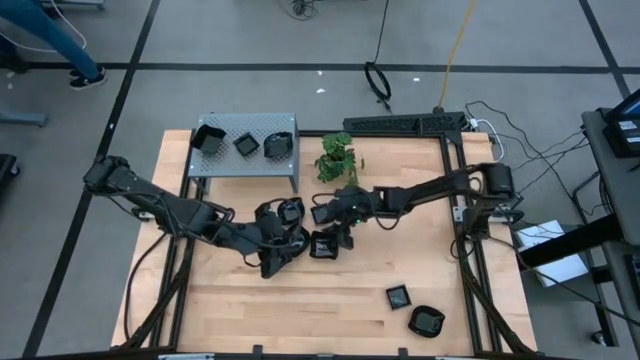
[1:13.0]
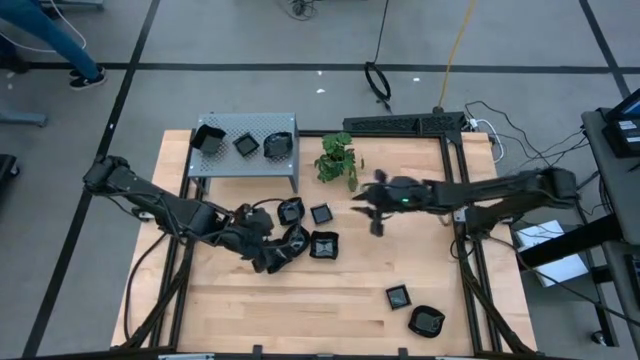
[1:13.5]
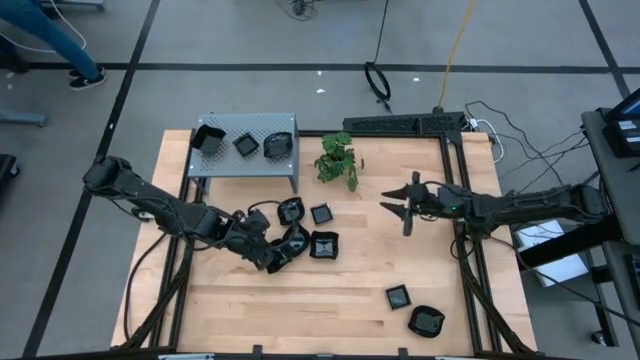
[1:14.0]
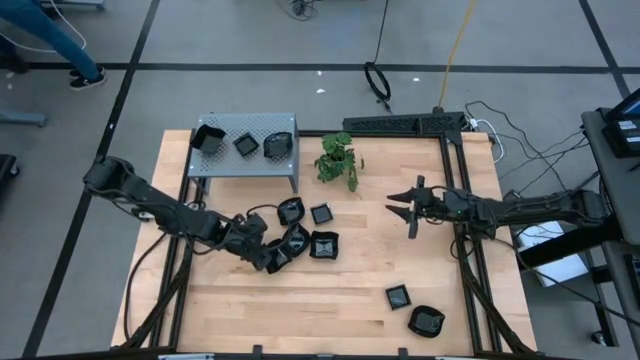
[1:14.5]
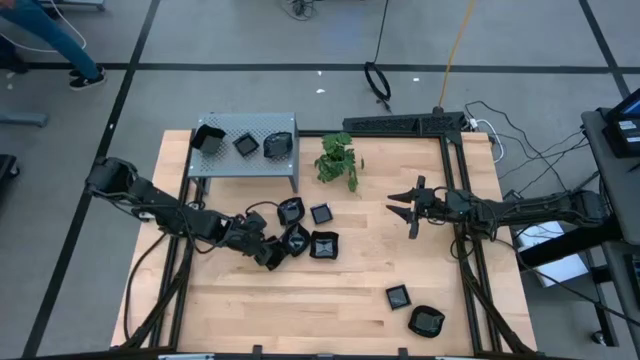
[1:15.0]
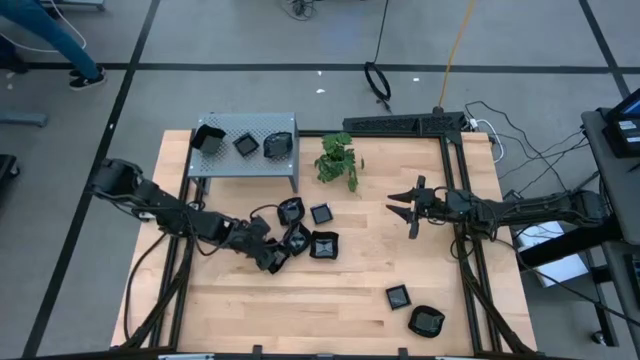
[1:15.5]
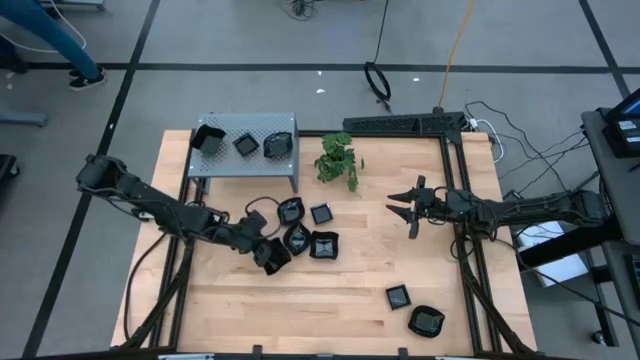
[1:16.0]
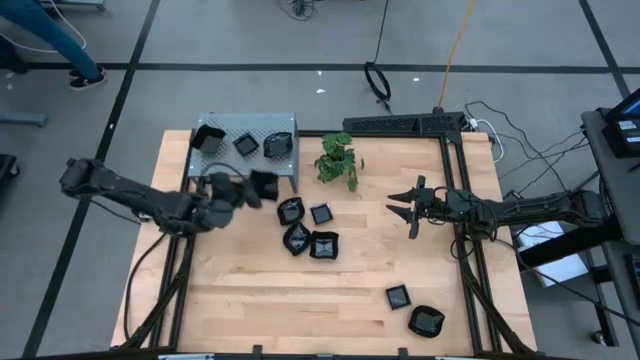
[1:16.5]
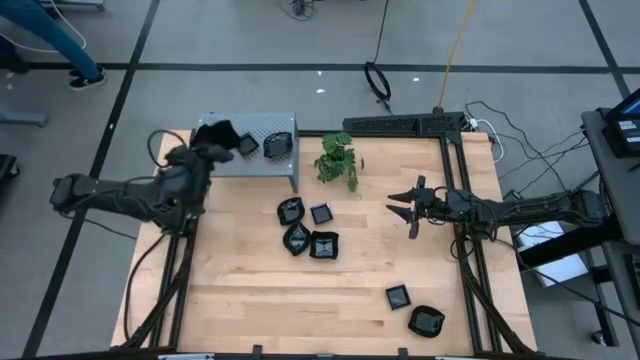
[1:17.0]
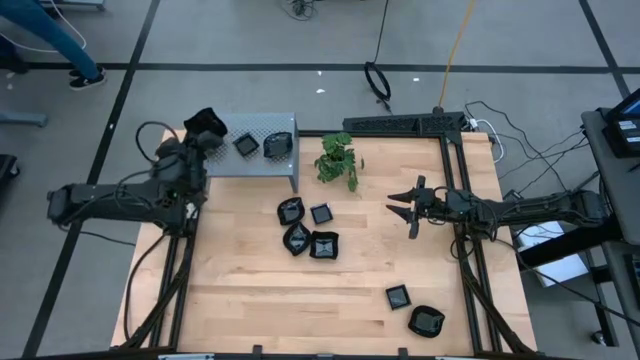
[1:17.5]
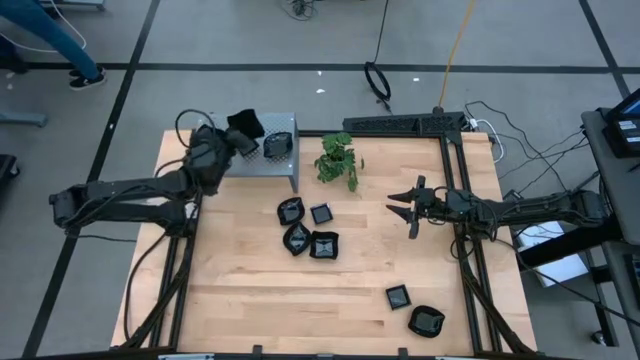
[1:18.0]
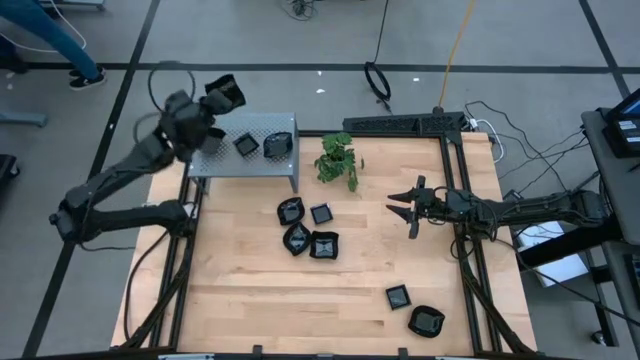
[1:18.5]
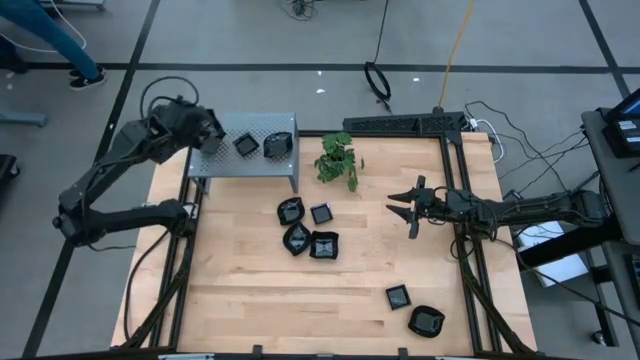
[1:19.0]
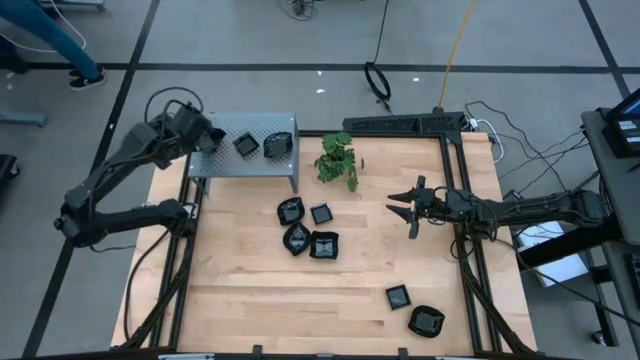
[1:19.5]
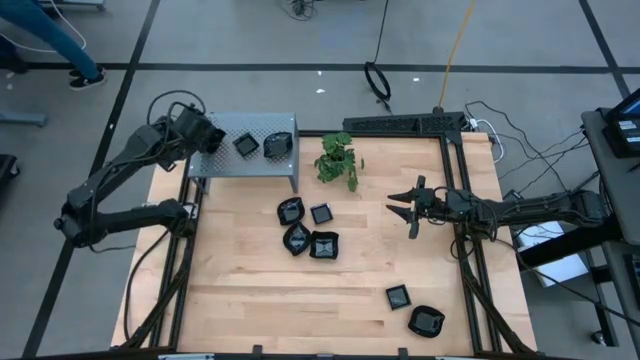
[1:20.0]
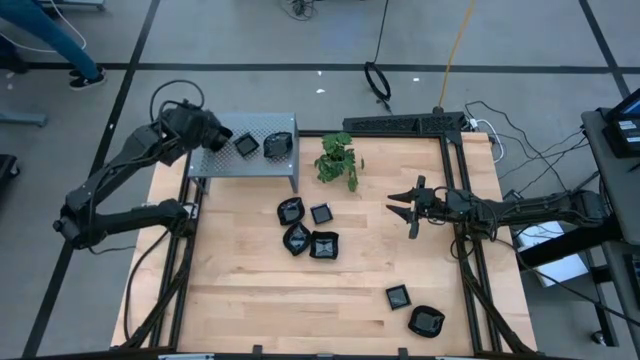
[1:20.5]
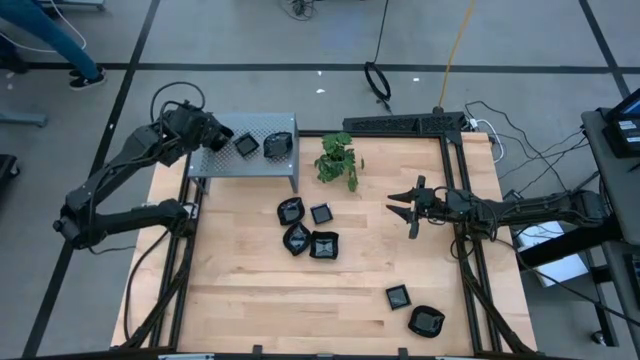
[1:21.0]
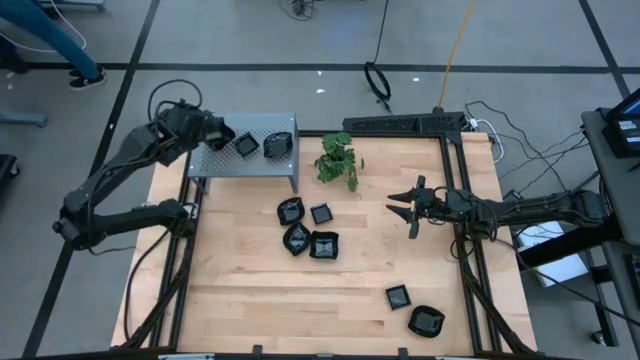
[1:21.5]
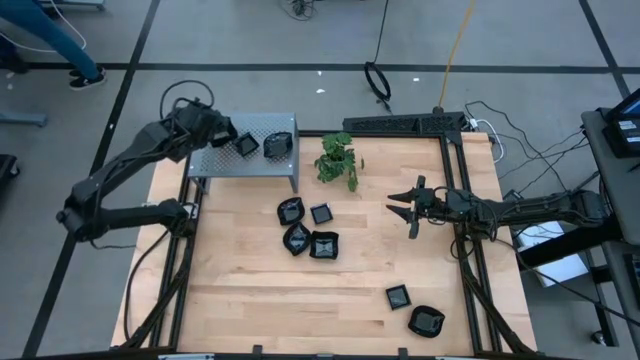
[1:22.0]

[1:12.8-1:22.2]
Task: Pick & Place Mini shaped plates
Stack the distorted square plate on top of the distorted square plate on the shelf

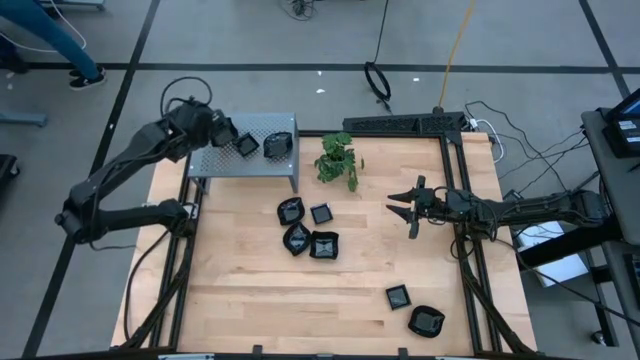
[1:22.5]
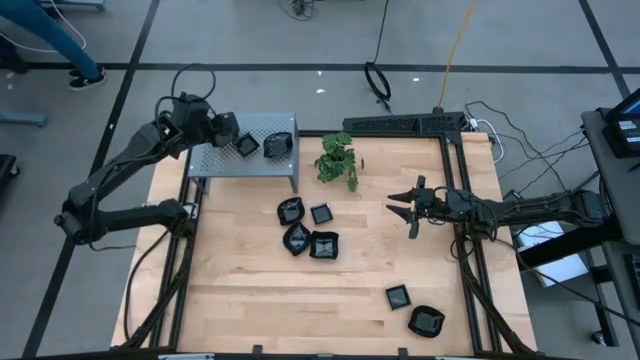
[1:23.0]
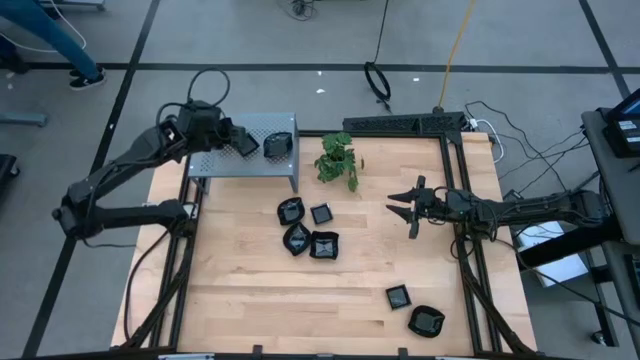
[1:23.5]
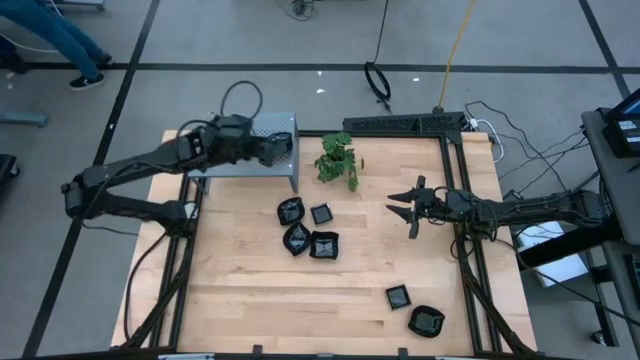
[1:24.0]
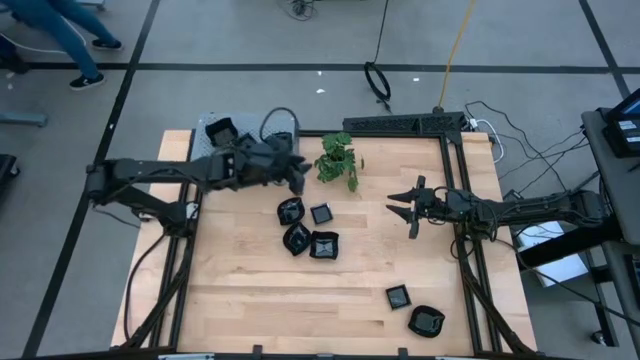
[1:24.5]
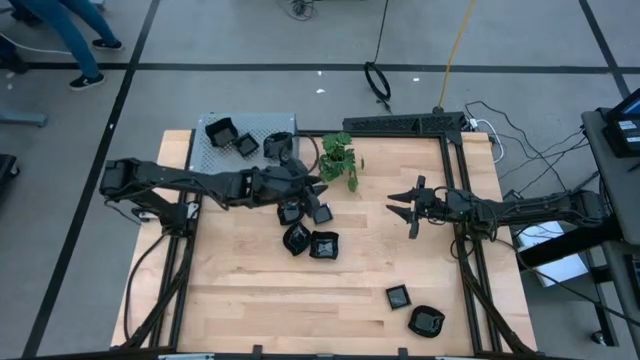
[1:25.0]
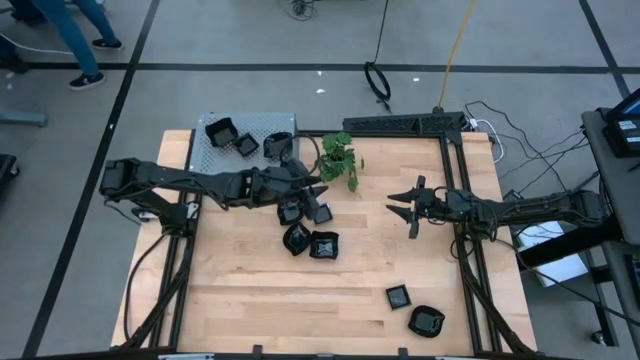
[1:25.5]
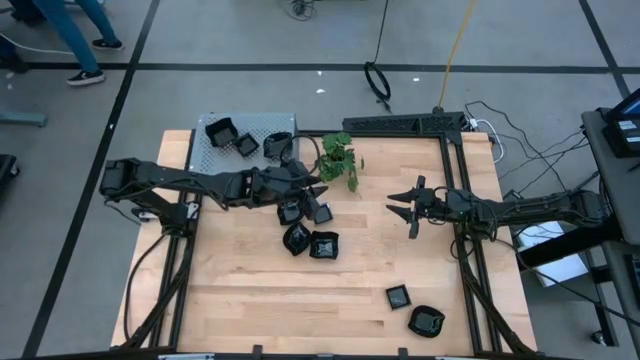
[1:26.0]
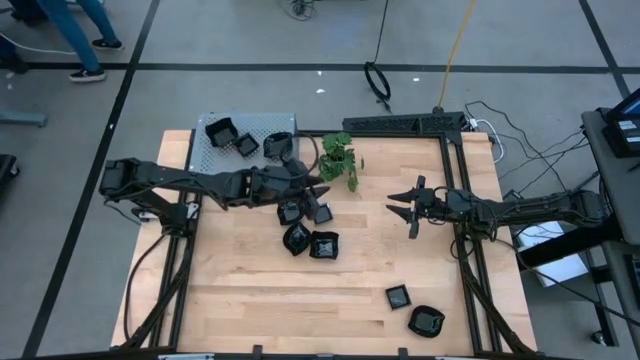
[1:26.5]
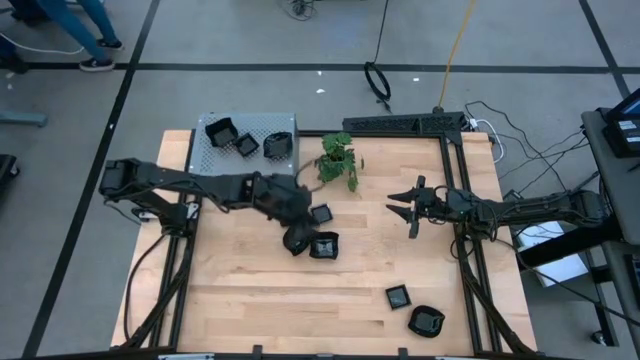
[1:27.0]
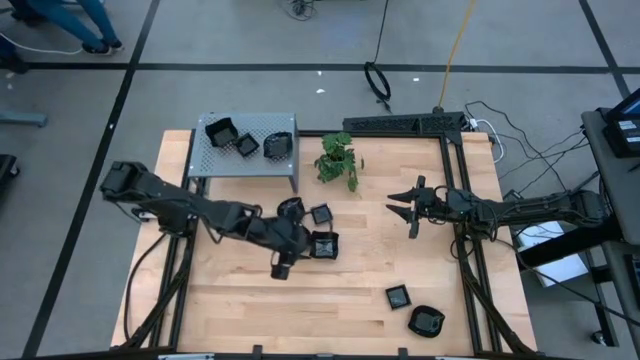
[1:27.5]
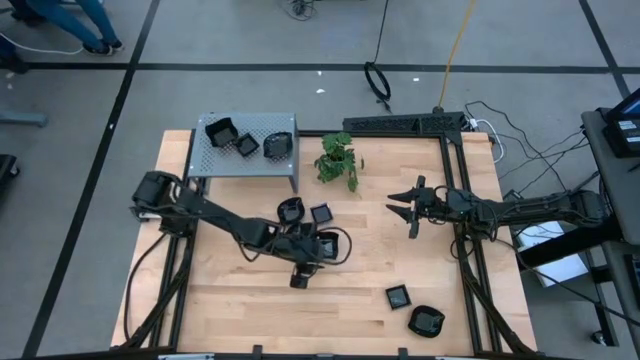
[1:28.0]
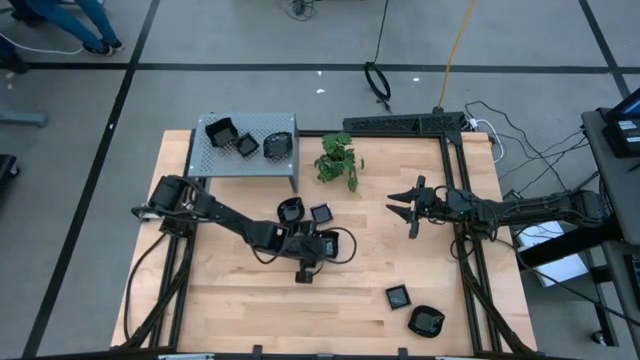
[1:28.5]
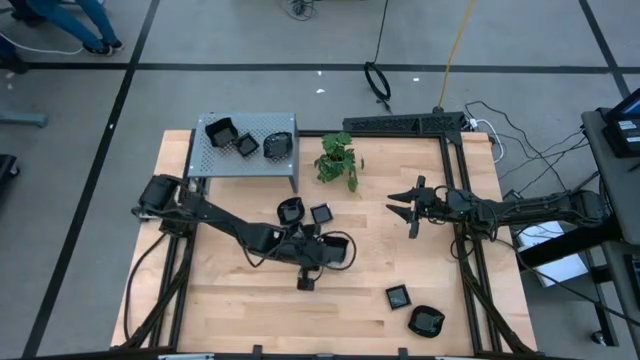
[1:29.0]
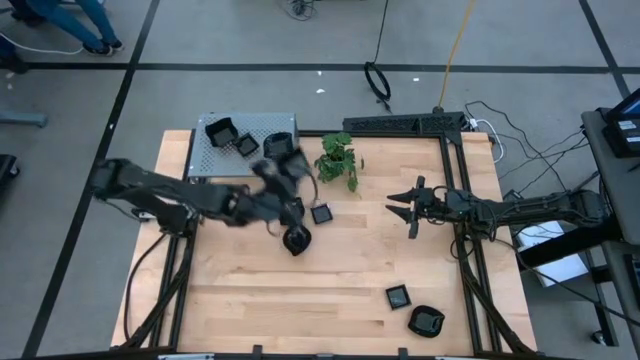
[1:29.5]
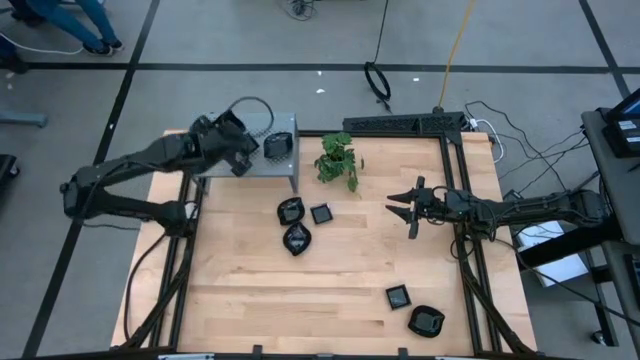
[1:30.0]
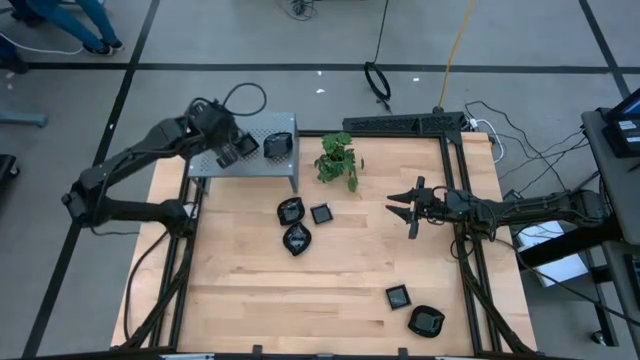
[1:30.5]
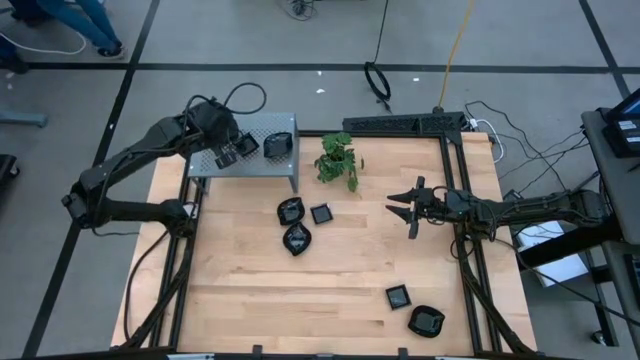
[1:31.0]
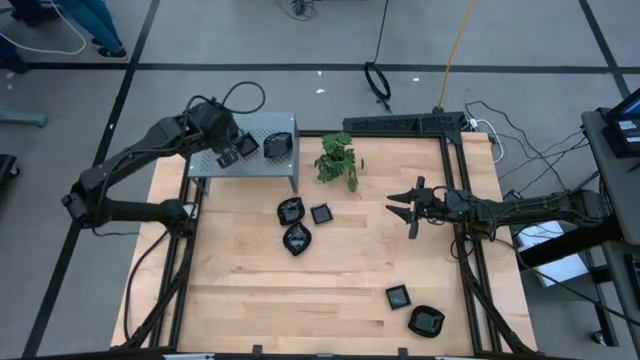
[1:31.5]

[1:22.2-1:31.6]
Stack the distorted square plate on top of the distorted square plate on the shelf

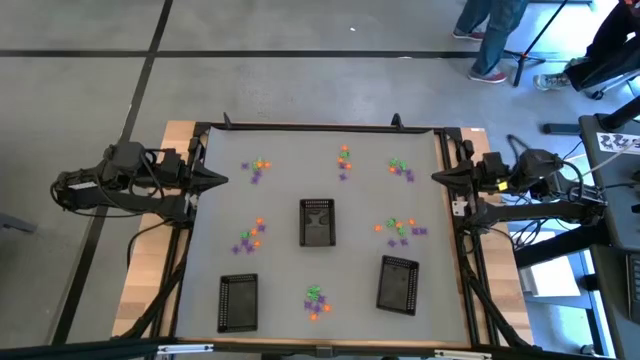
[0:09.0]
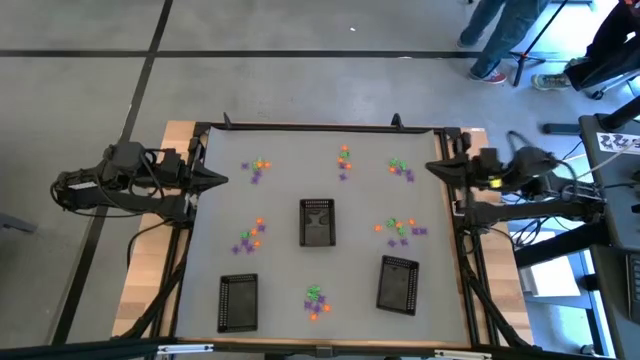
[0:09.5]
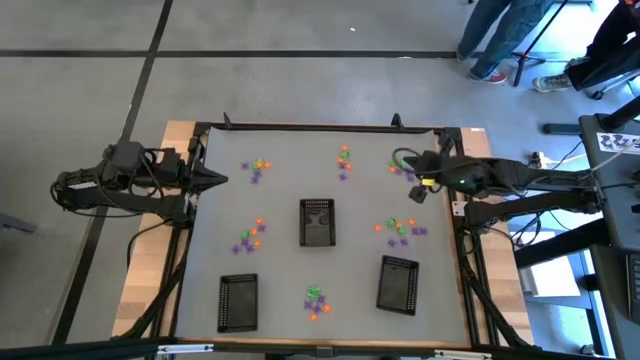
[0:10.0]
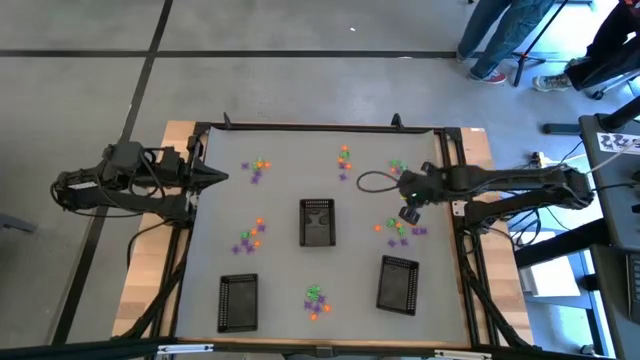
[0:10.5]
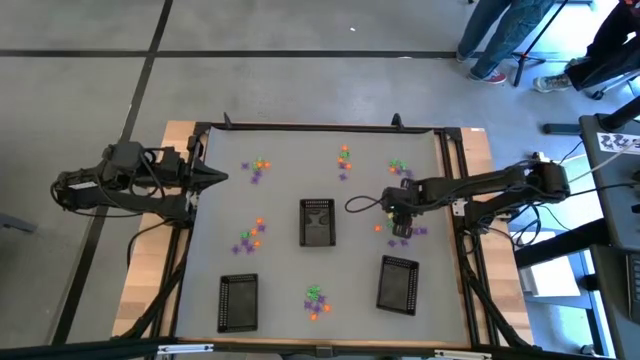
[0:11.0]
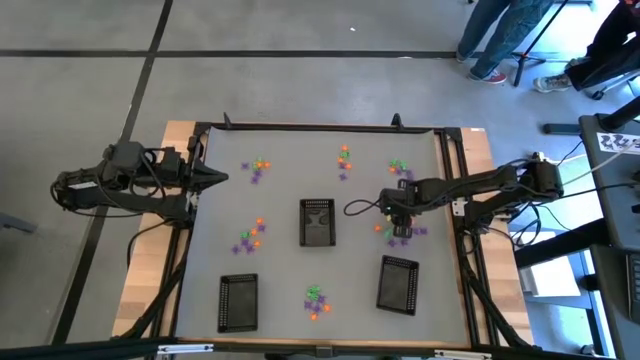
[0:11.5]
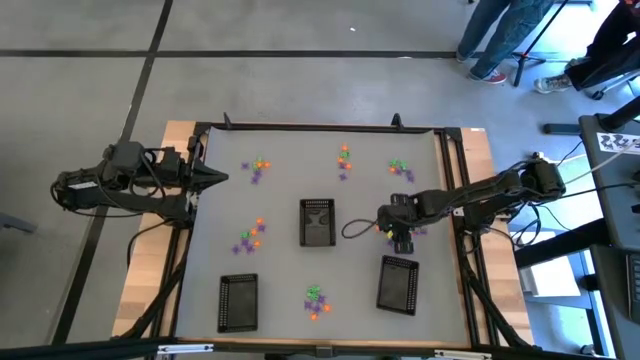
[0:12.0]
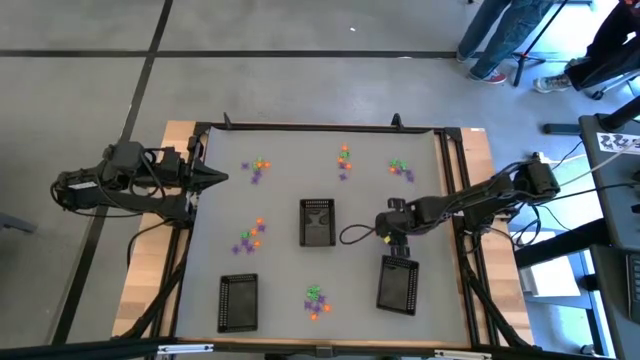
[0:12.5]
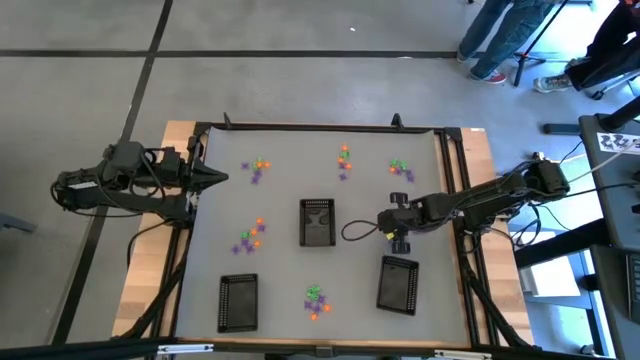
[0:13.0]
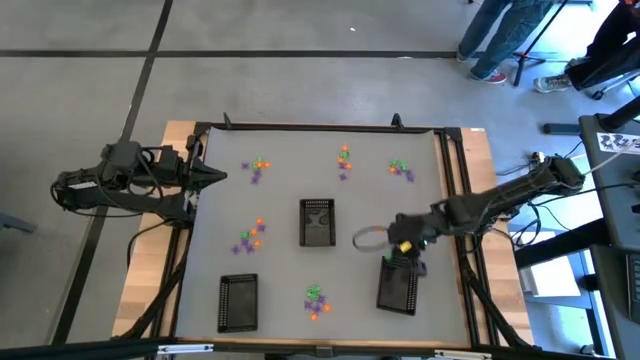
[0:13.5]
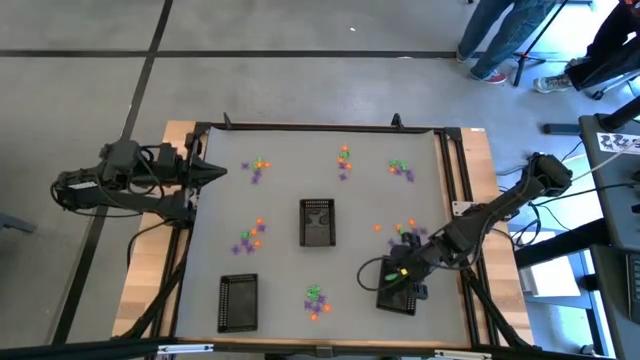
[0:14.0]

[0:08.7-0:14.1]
Task: Sort Halloween decoration
Put the green skeleton toy into the bottom right black bin
